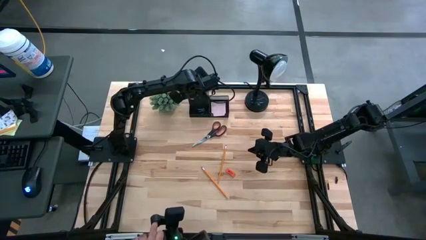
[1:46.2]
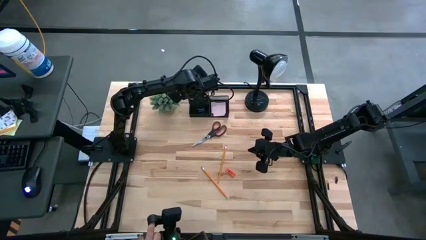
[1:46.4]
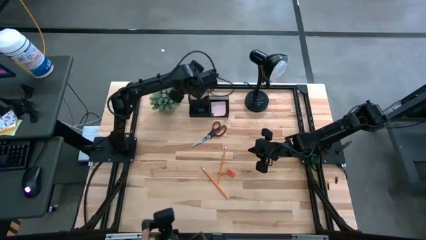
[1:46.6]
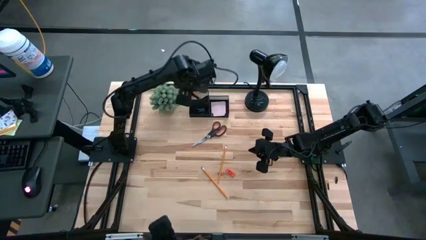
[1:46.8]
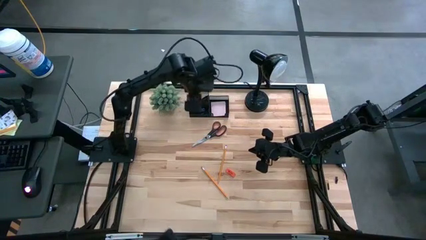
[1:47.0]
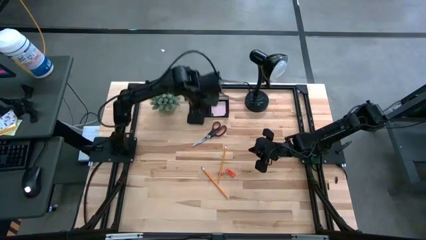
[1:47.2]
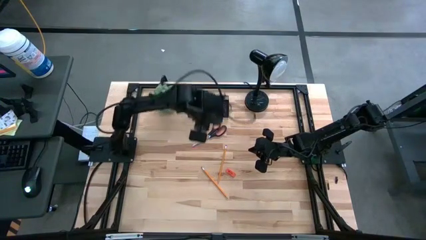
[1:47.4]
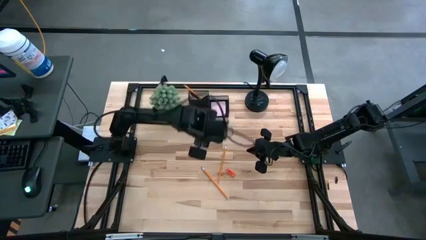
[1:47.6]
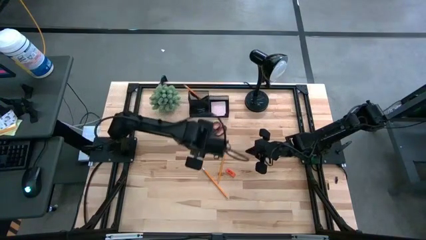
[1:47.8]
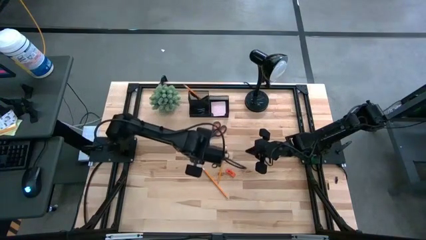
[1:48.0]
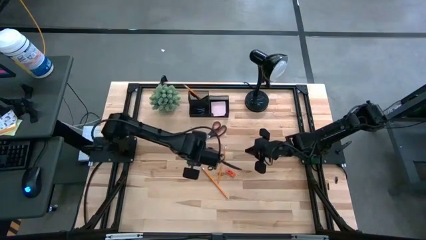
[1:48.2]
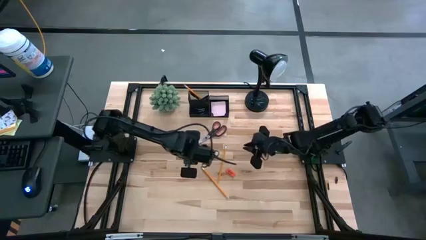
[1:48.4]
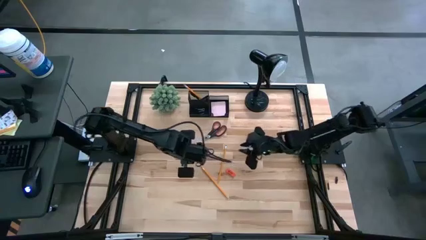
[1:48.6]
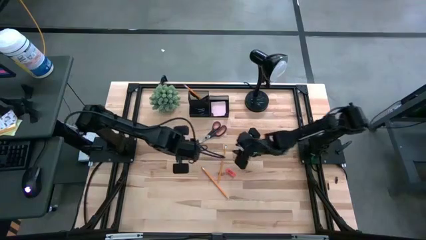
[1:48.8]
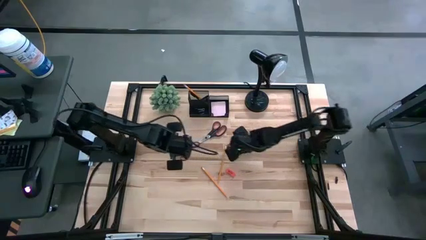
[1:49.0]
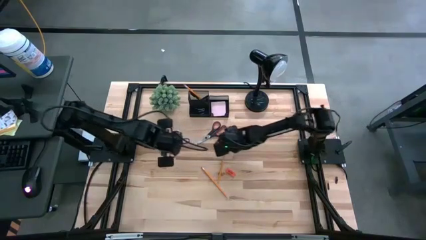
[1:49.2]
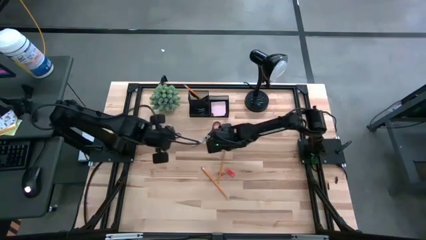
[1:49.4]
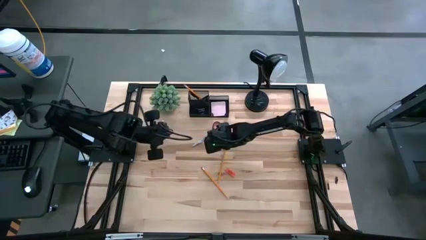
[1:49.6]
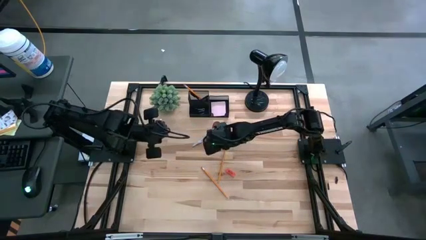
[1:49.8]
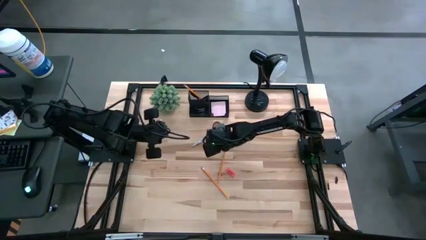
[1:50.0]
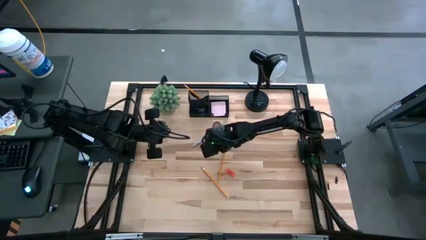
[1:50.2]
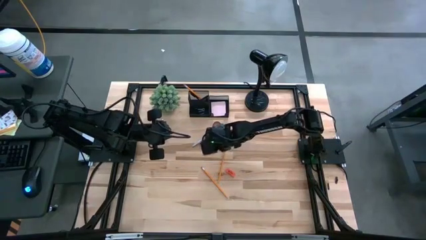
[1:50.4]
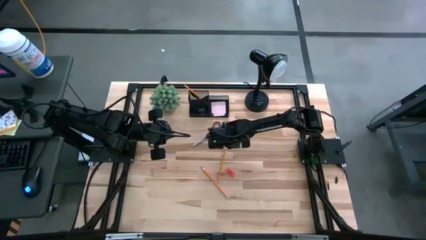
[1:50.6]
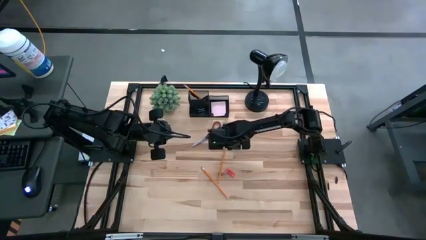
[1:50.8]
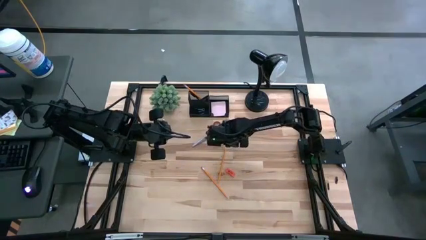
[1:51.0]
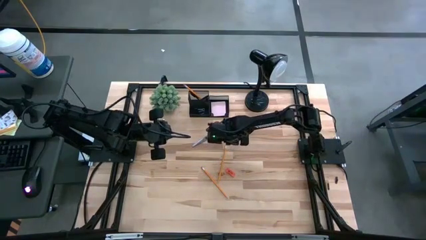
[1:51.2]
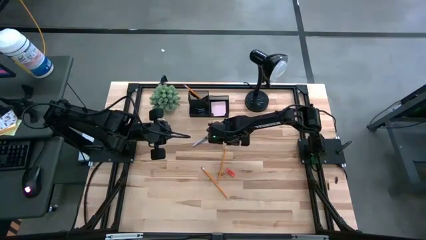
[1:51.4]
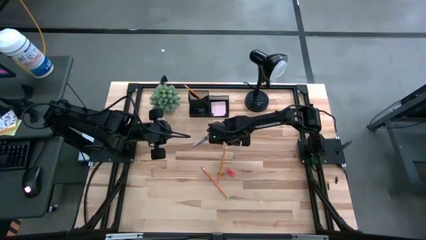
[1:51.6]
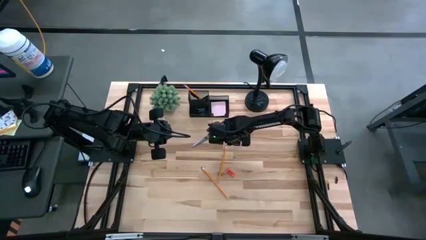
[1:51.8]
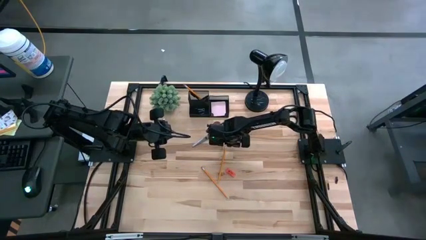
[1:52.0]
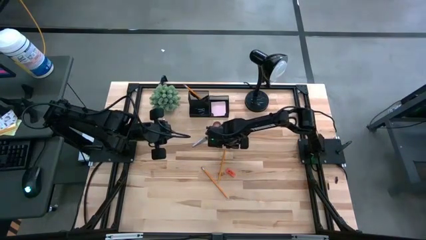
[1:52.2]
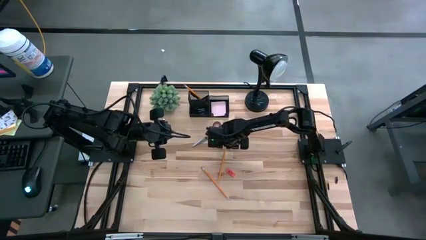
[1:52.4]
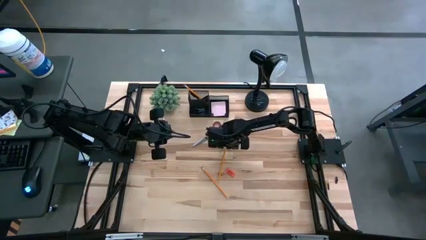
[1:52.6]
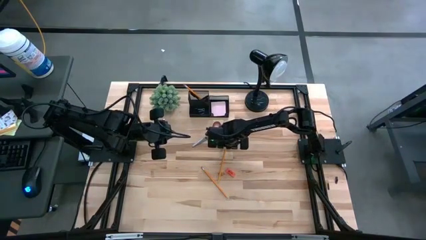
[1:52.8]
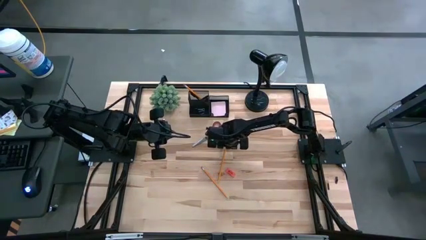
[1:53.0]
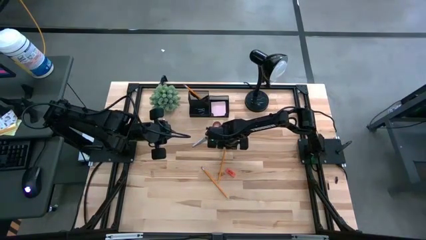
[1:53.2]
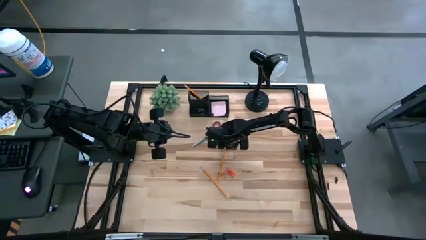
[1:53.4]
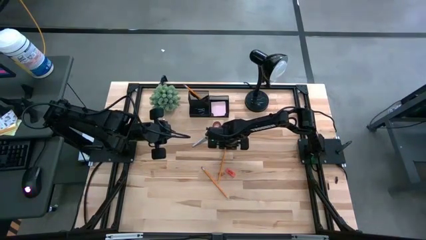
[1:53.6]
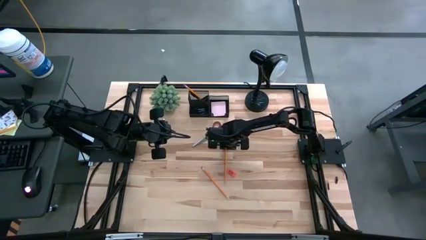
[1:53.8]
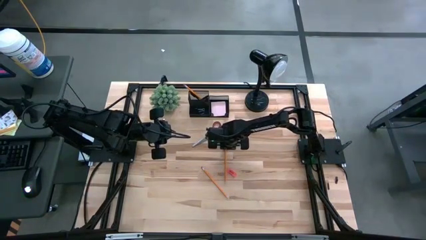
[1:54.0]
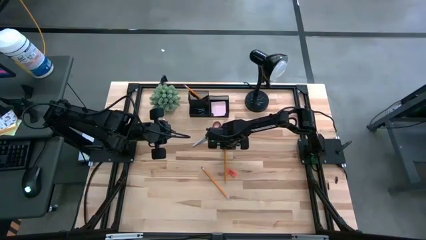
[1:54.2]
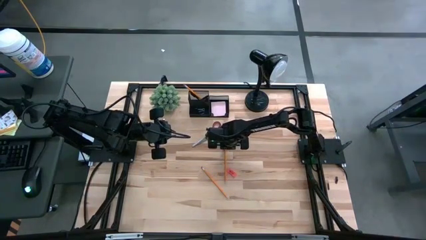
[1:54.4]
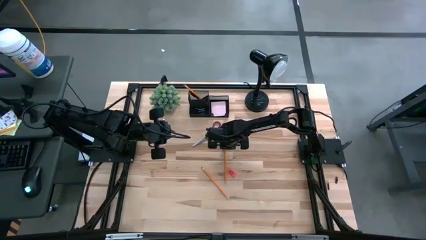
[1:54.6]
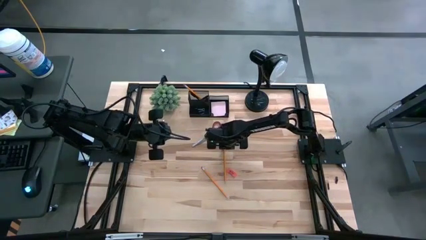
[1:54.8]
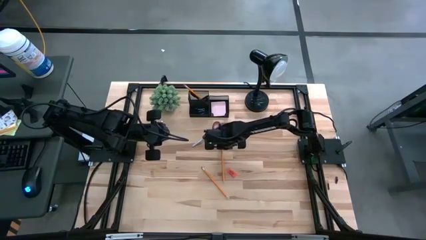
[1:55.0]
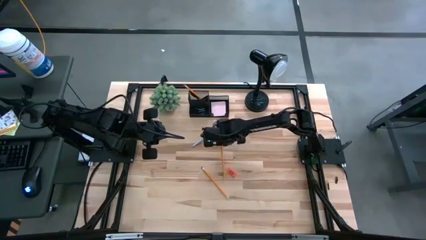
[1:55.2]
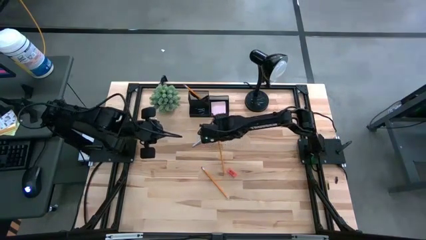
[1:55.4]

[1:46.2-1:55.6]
Task: Pick and place office supplies into organizer
Put the top pencil into the black desk organizer

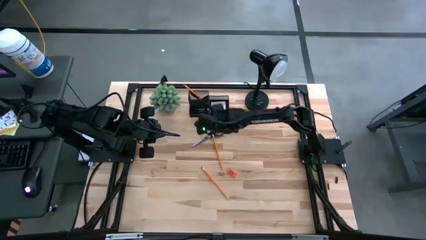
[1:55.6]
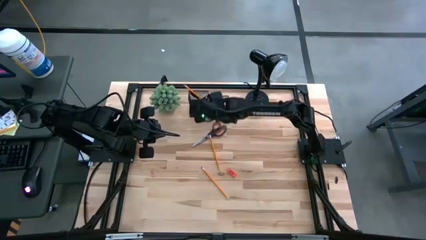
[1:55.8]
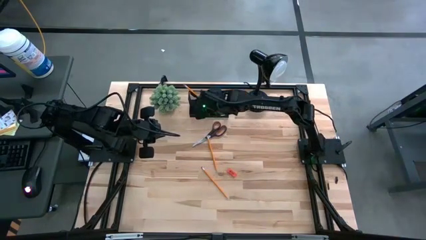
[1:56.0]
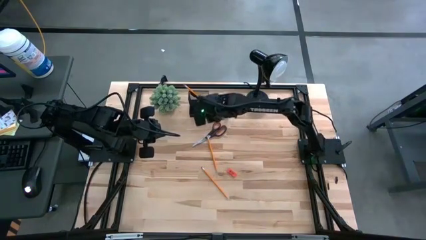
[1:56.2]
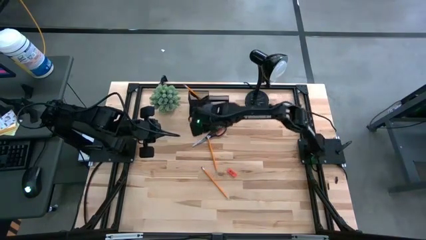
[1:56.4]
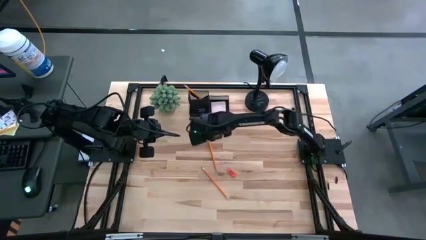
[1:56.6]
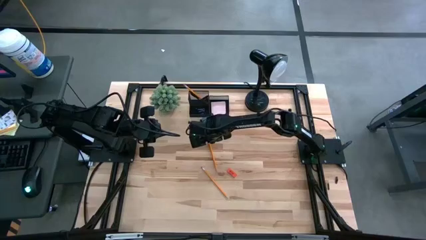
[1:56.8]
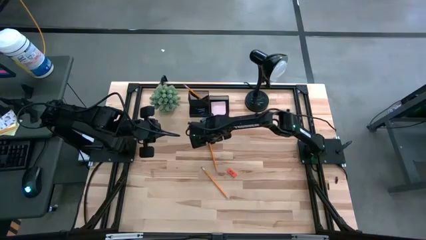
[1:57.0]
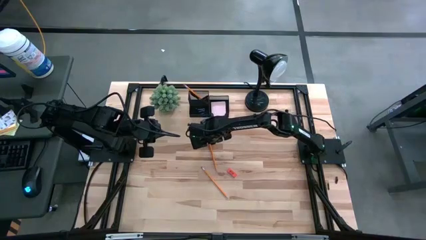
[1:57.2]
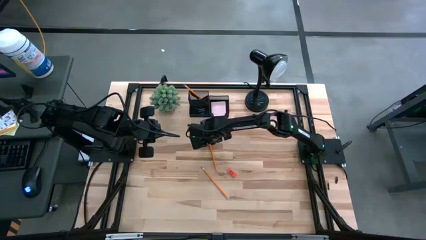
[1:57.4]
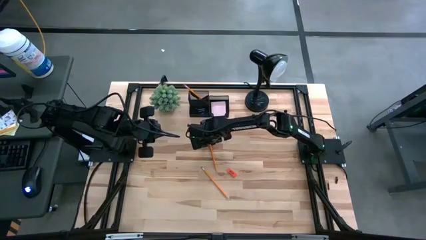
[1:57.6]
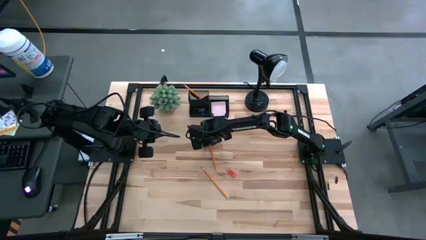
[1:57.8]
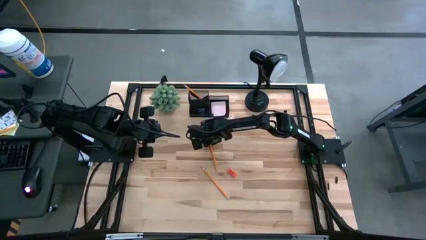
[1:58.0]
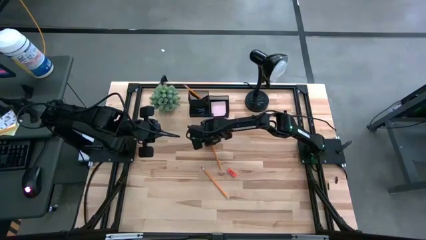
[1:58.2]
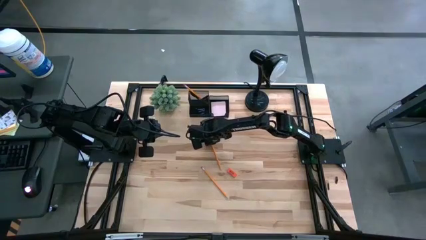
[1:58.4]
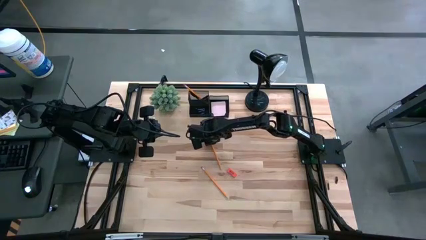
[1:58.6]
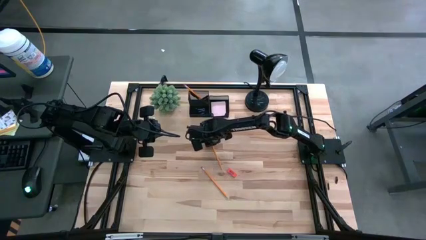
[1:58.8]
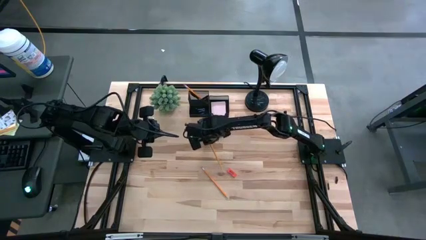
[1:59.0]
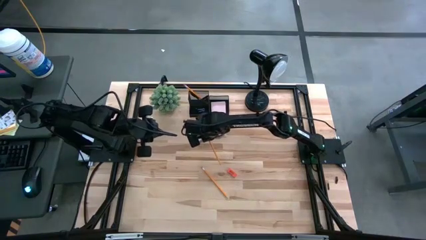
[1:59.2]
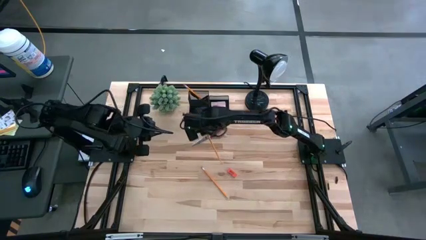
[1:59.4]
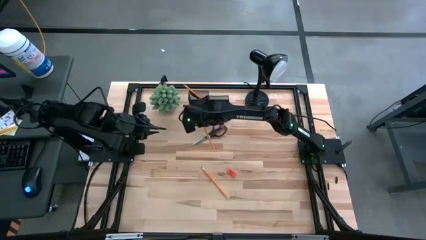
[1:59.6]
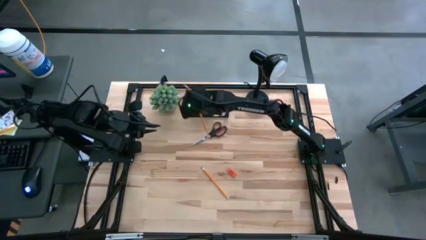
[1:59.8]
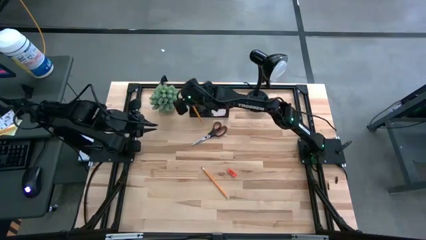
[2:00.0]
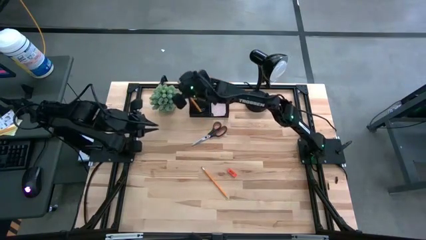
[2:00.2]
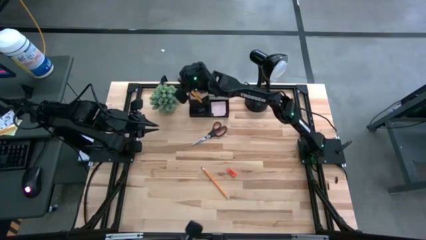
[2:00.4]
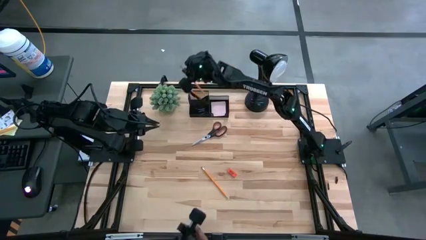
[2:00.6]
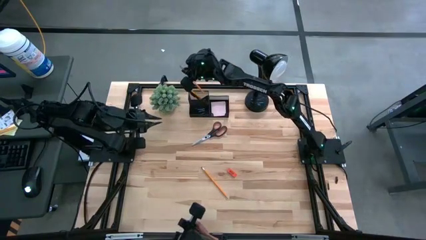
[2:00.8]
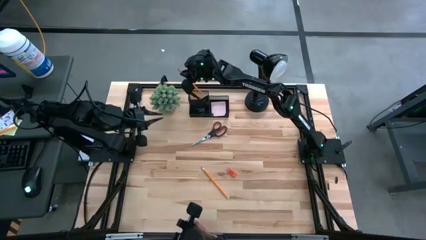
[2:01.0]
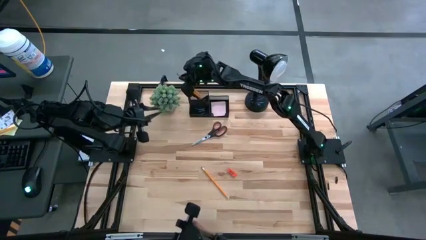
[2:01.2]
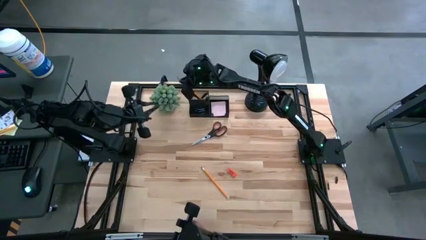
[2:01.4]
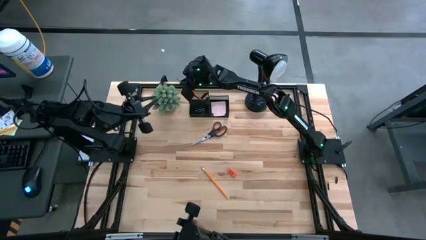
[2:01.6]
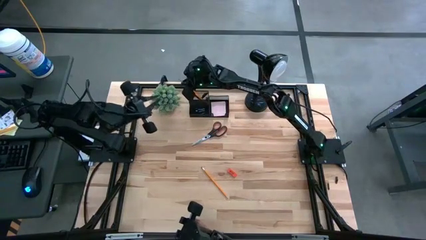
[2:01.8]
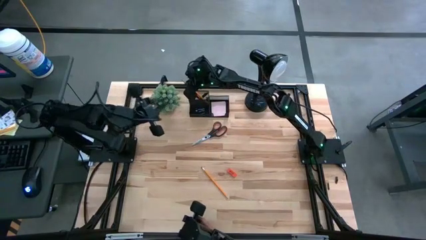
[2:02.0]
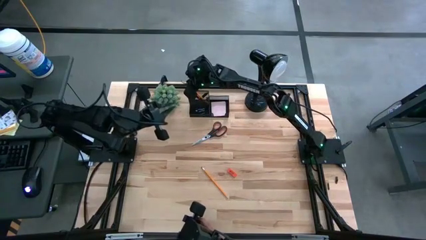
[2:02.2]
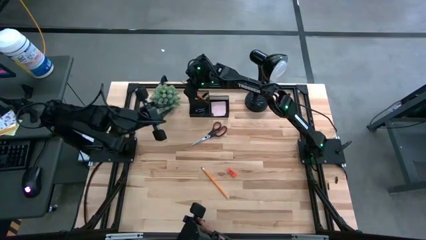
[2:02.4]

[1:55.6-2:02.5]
Put the top pencil into the black desk organizer
